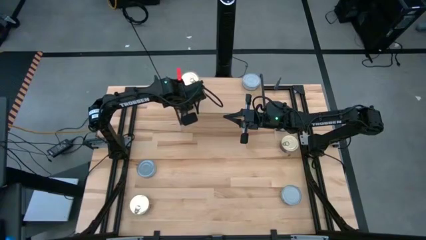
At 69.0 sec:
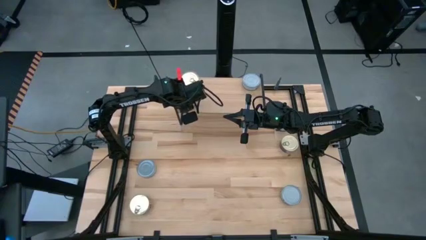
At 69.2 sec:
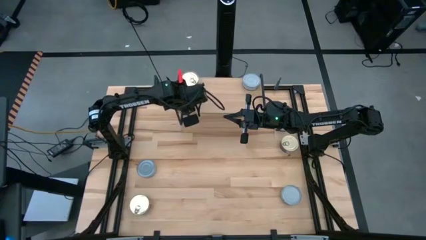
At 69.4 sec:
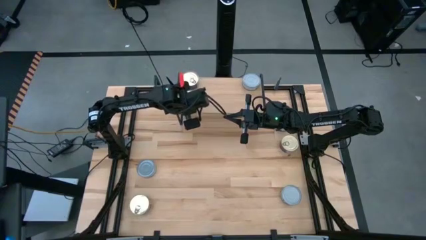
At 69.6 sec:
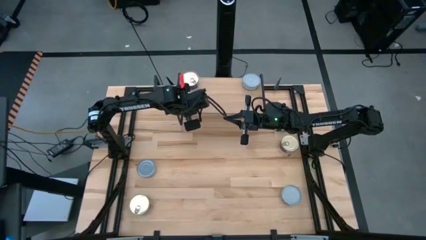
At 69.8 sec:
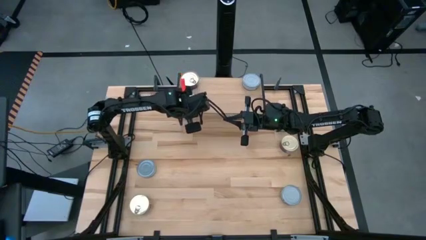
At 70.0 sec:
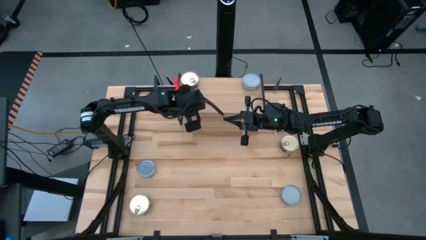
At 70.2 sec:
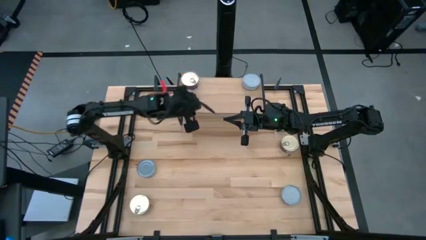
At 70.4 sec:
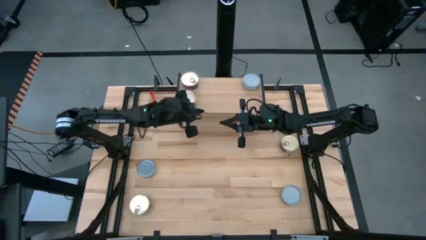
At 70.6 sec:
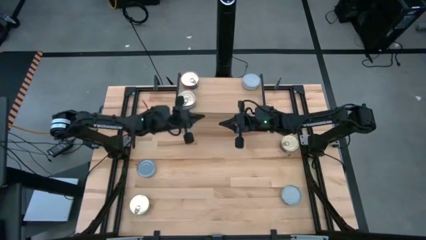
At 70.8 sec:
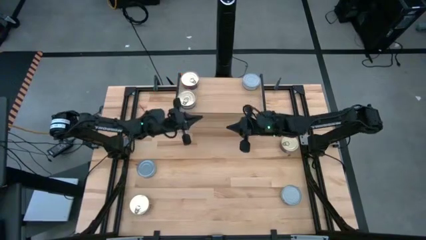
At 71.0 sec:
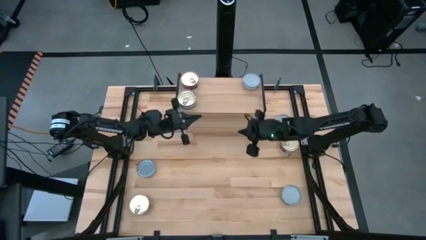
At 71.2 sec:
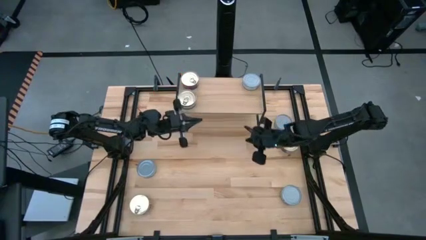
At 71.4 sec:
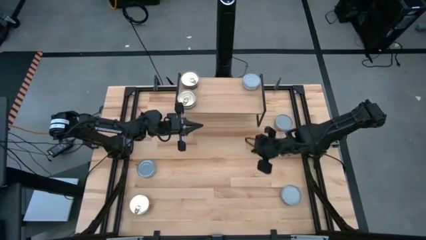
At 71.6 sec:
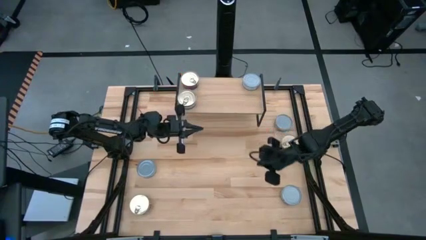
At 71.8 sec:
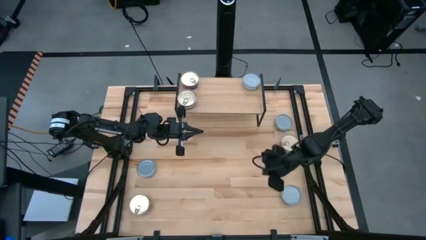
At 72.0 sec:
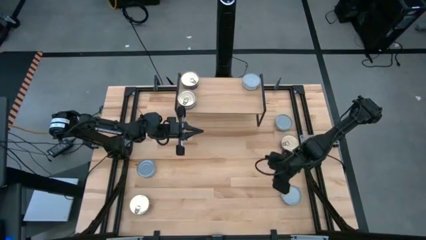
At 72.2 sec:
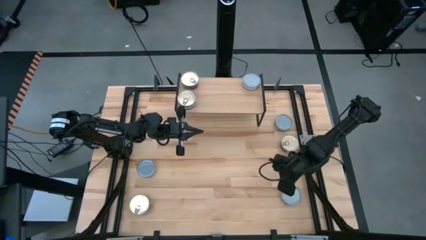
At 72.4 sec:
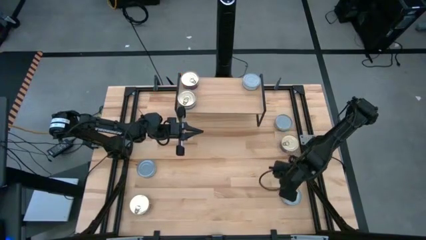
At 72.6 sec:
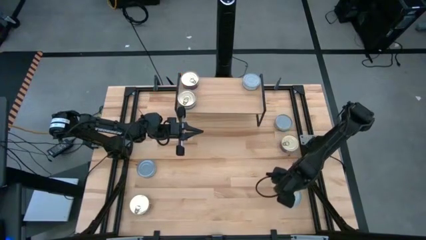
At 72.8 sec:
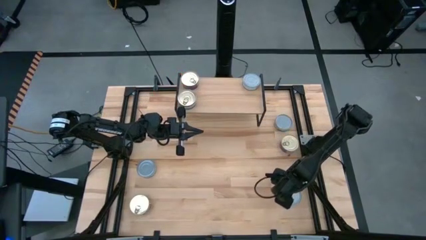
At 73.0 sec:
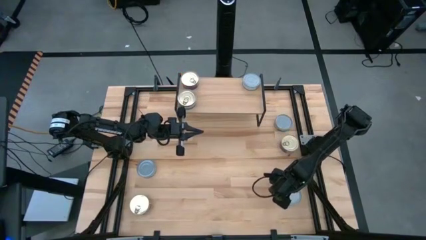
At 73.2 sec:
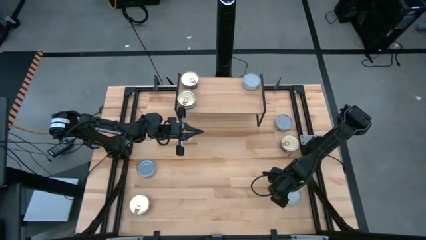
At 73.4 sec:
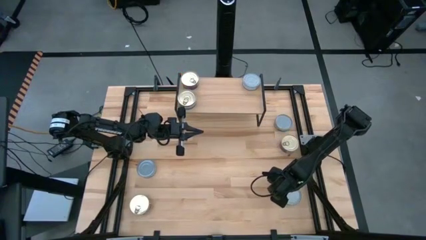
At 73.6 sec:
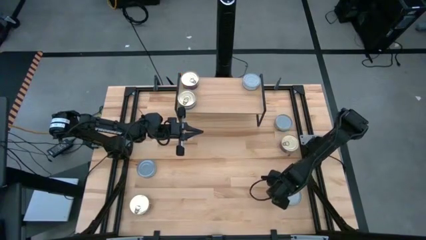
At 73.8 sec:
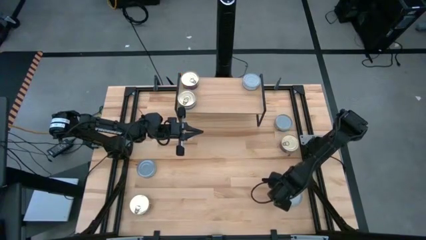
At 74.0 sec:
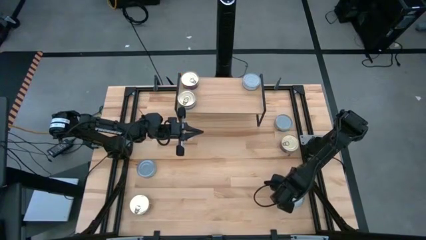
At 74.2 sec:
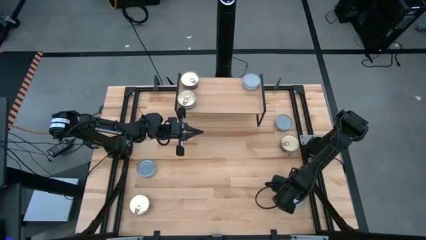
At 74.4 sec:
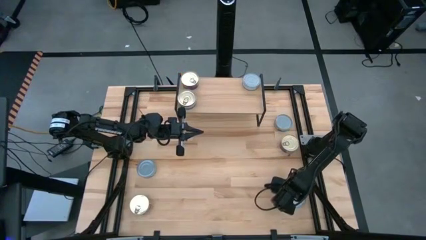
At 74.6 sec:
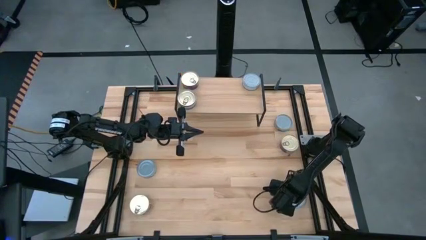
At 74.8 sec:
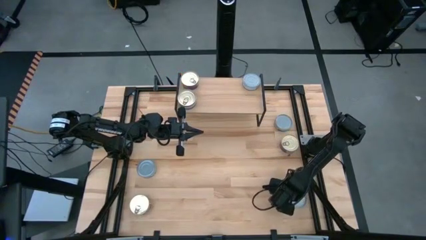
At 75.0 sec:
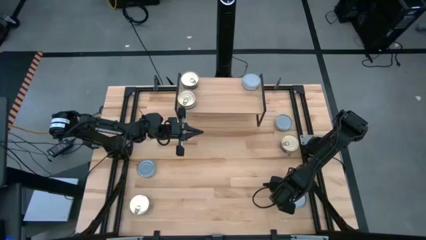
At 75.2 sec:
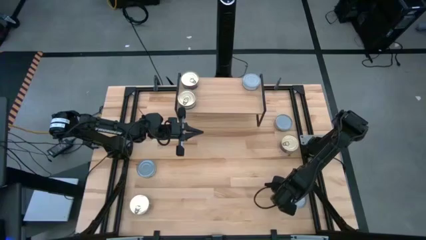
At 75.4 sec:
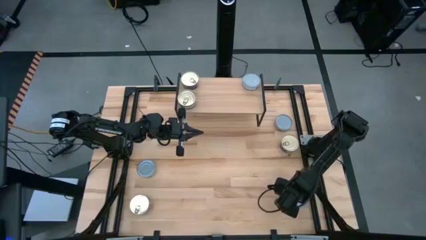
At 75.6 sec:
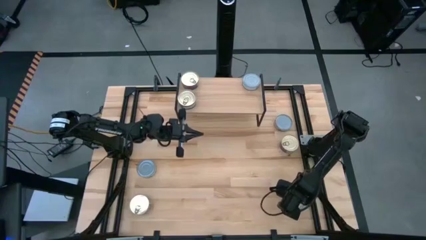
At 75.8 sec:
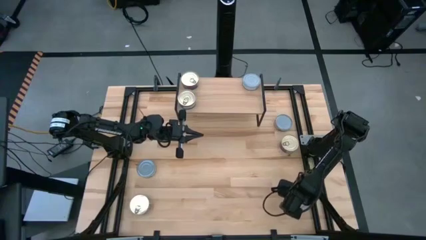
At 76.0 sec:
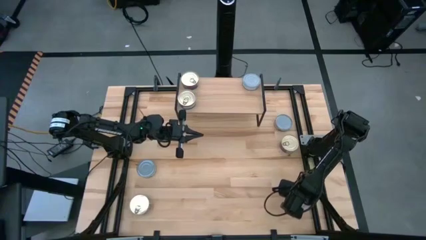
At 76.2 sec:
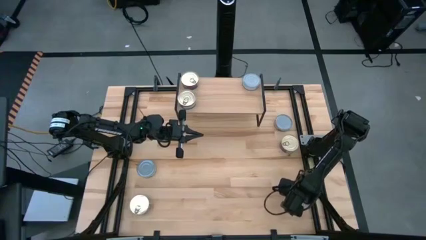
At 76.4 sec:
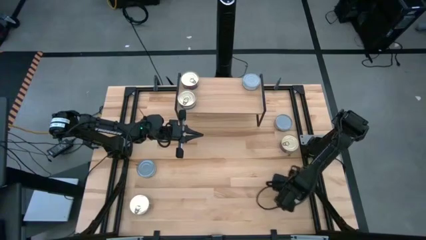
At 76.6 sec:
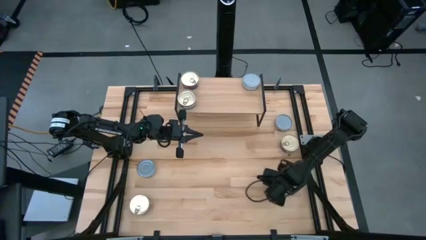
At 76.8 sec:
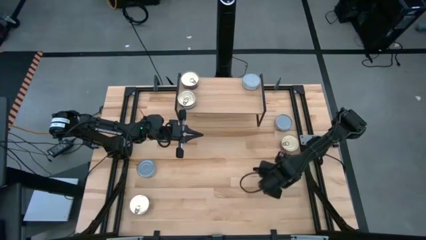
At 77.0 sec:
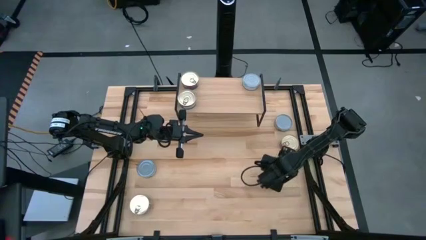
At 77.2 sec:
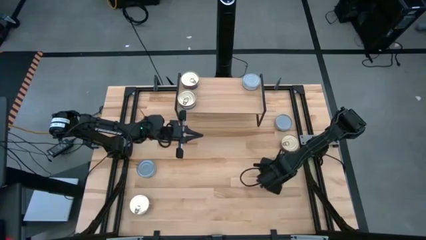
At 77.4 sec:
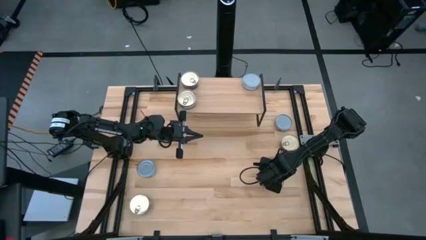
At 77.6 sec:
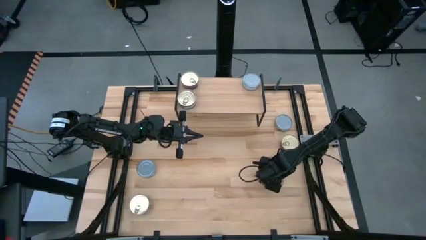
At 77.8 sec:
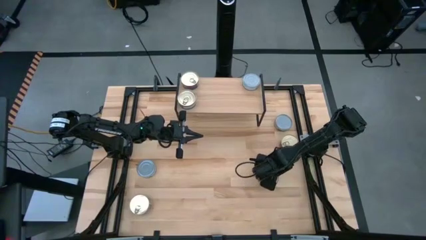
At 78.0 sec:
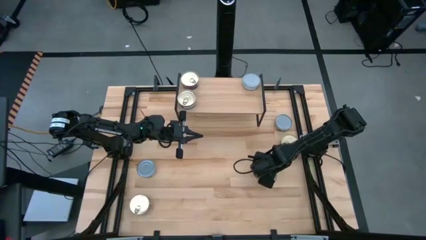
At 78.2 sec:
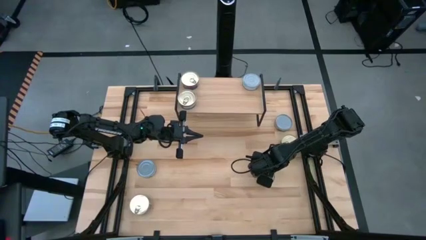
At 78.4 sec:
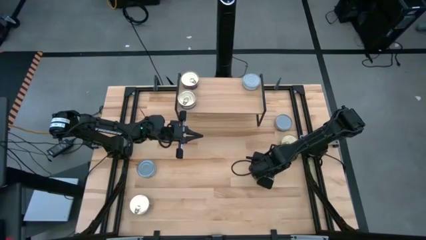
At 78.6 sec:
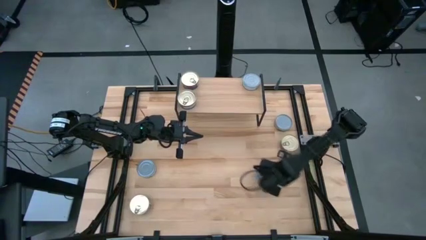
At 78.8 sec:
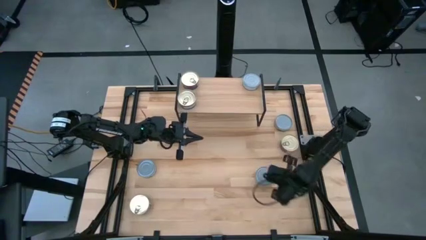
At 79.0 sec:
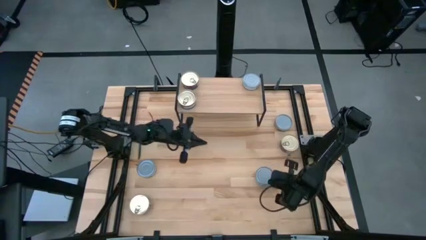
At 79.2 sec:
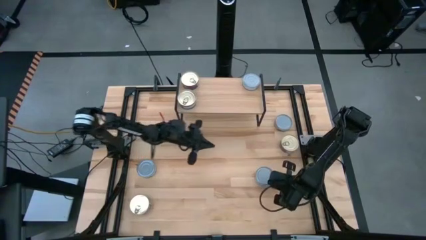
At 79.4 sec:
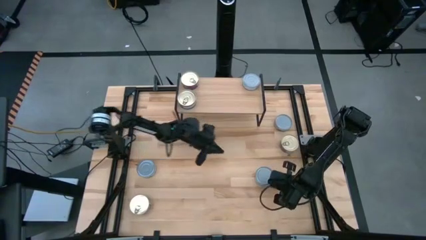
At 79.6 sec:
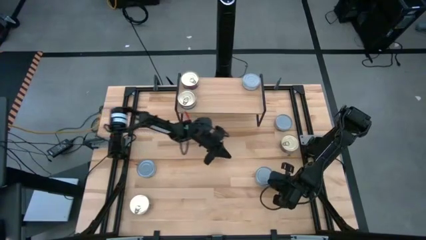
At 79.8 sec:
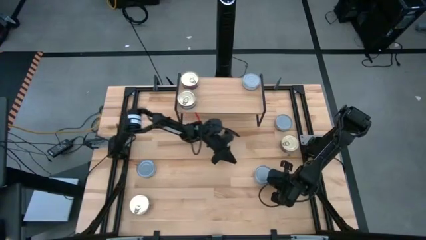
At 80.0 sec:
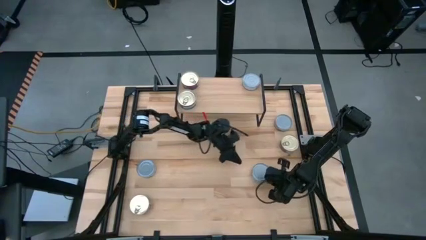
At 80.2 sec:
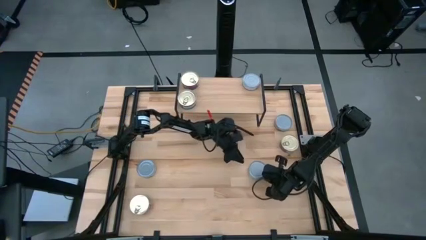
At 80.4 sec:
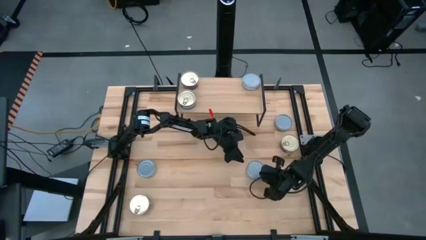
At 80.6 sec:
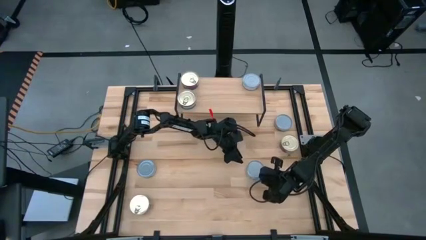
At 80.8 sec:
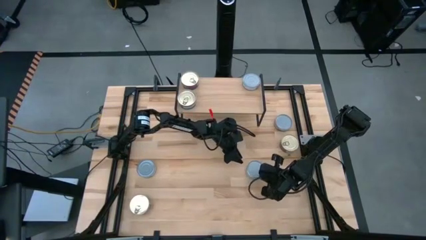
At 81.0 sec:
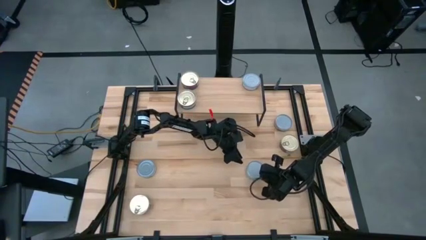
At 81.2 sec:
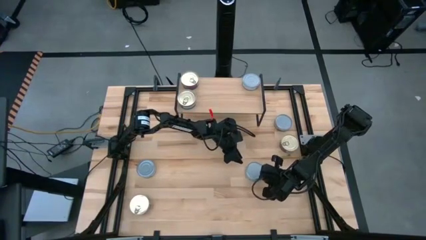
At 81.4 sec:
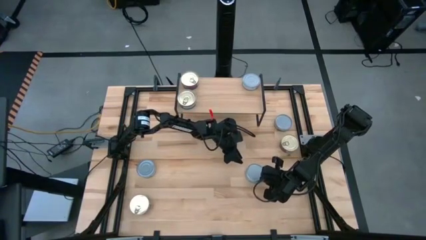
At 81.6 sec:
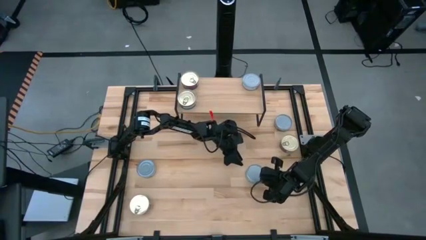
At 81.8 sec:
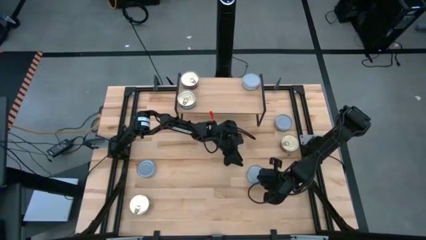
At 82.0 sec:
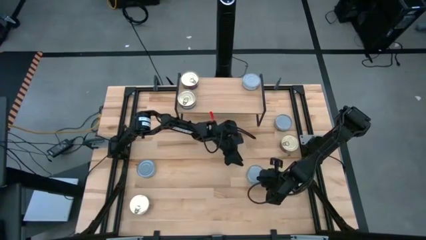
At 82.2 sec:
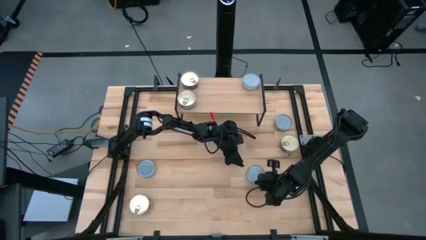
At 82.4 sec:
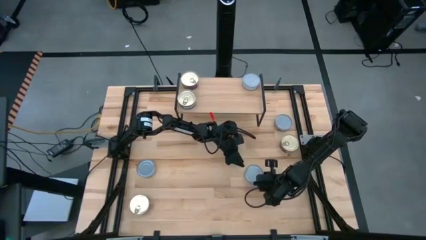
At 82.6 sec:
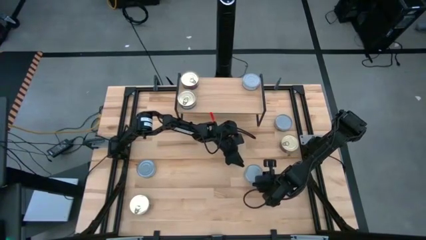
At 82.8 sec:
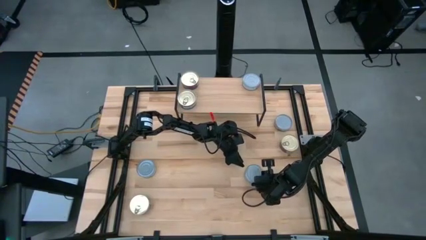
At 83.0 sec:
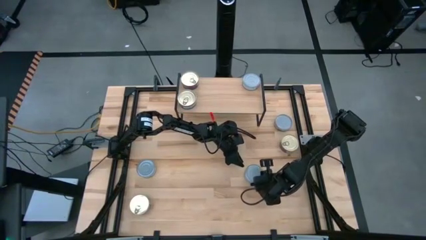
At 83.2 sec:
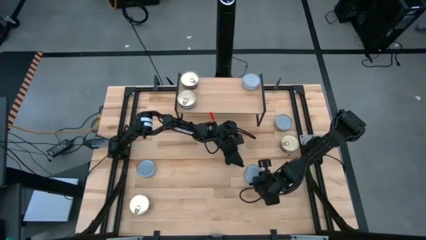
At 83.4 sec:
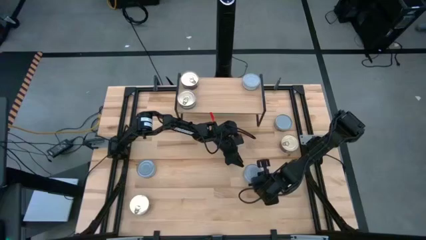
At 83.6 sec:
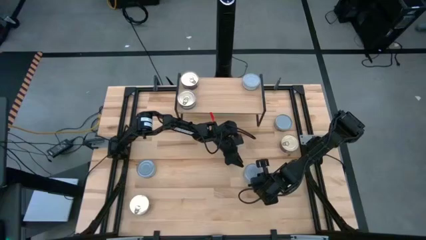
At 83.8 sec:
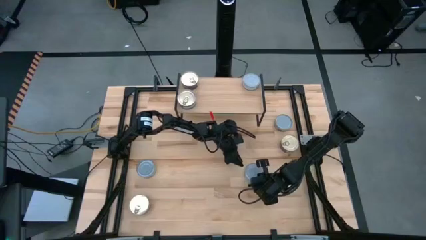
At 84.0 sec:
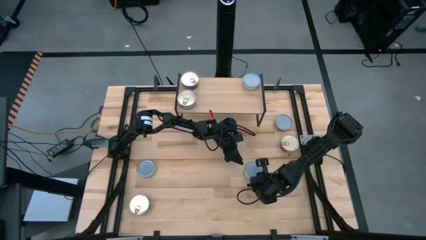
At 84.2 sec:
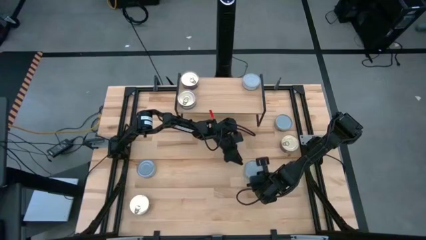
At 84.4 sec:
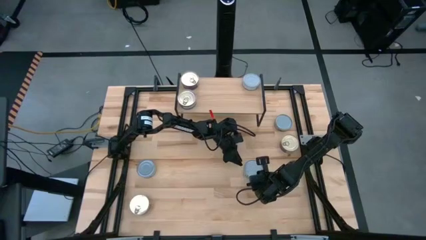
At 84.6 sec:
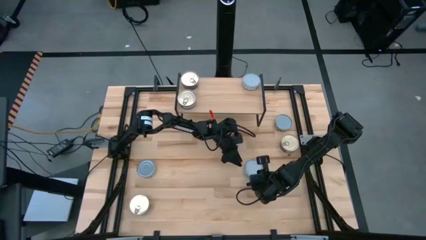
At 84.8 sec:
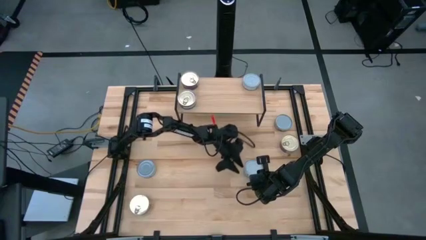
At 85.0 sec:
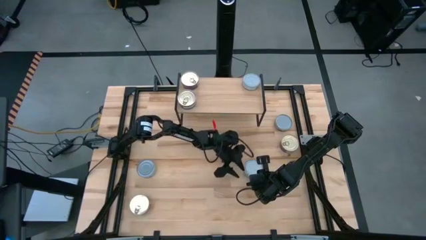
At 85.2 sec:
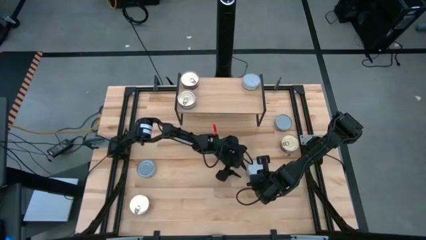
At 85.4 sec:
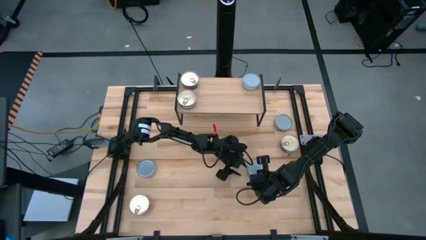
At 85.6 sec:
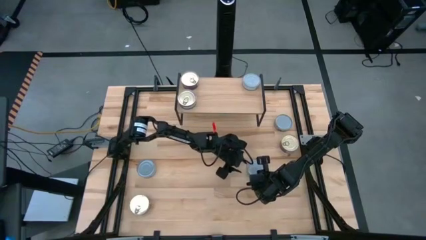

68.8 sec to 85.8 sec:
Task: Stack canned seafood by type on shelf
Put the bottom right green tuna can on the shelf aligned with the other green tuna can
